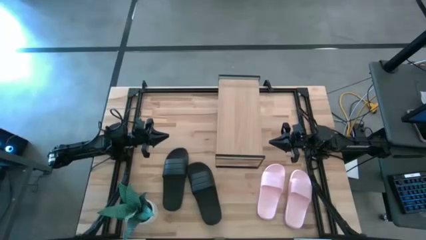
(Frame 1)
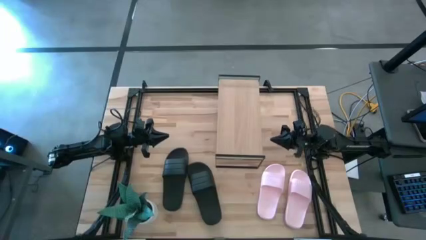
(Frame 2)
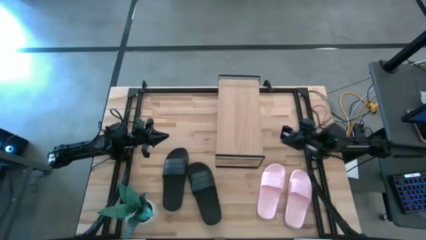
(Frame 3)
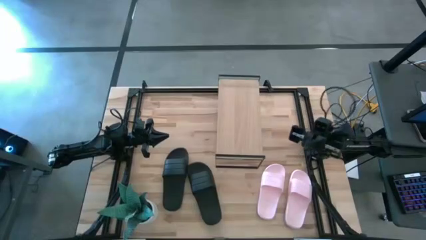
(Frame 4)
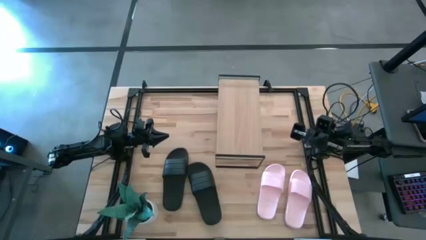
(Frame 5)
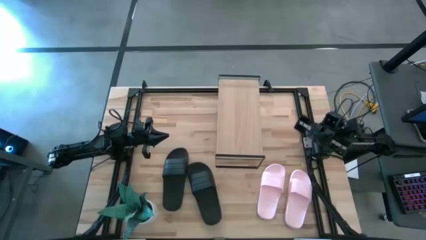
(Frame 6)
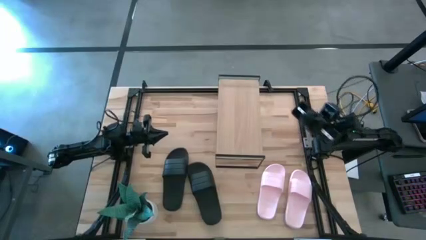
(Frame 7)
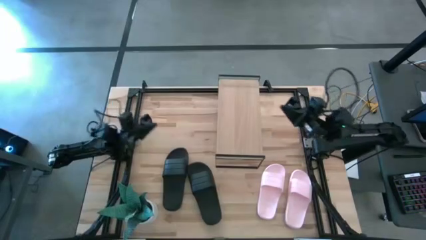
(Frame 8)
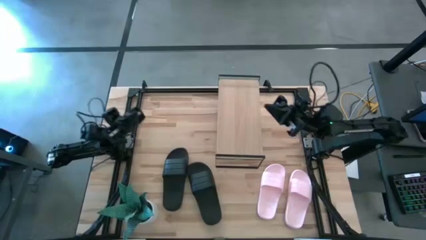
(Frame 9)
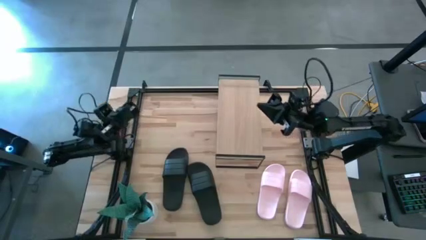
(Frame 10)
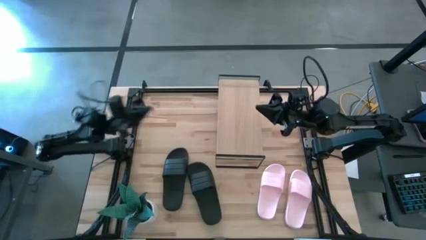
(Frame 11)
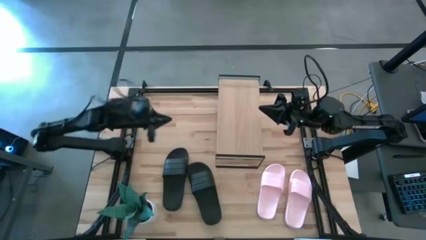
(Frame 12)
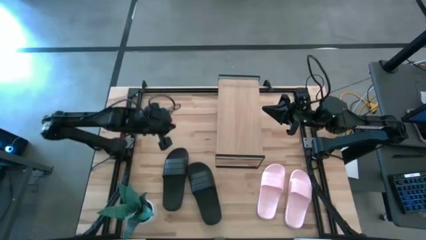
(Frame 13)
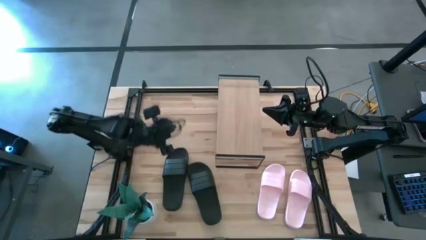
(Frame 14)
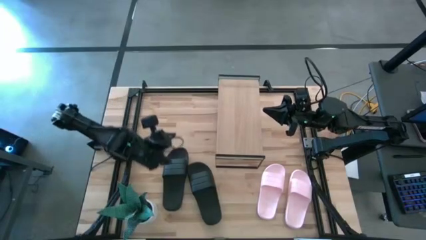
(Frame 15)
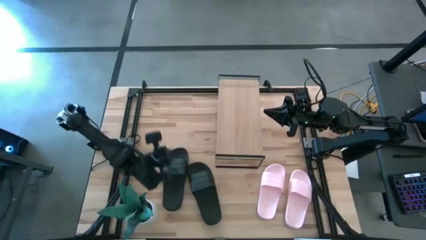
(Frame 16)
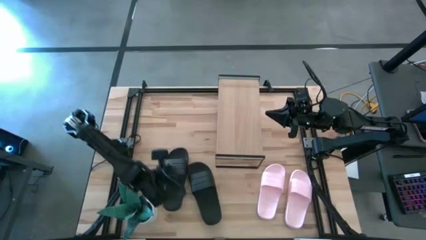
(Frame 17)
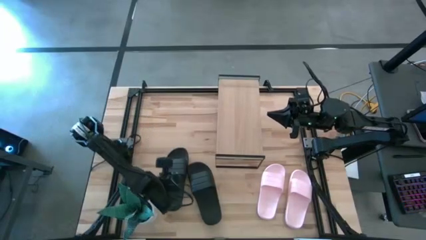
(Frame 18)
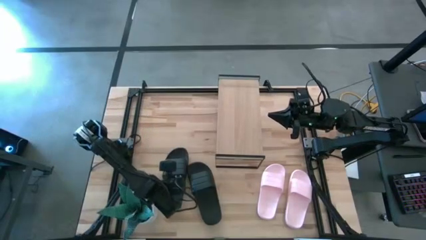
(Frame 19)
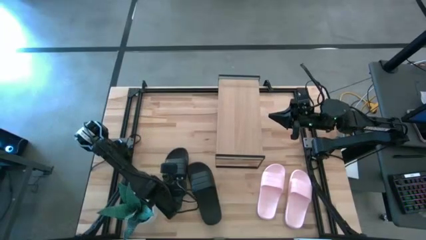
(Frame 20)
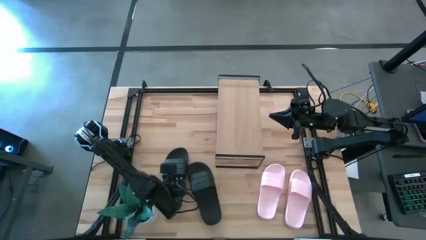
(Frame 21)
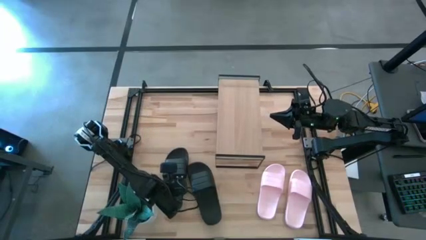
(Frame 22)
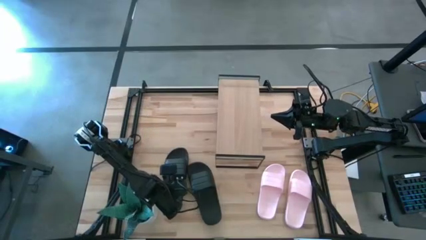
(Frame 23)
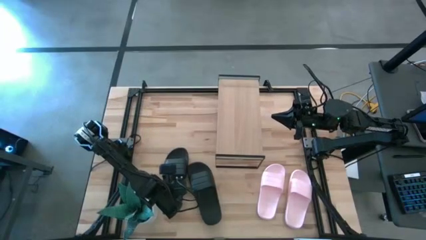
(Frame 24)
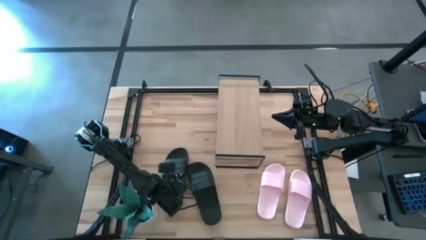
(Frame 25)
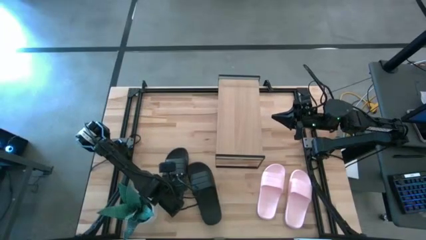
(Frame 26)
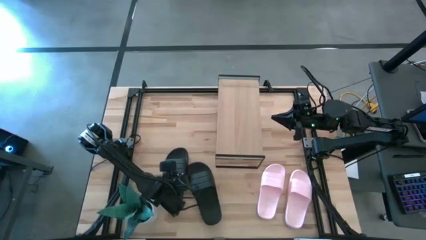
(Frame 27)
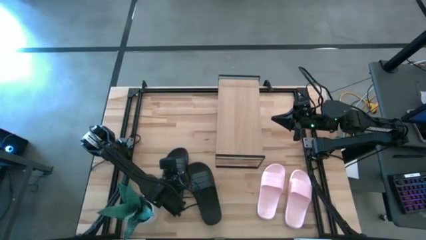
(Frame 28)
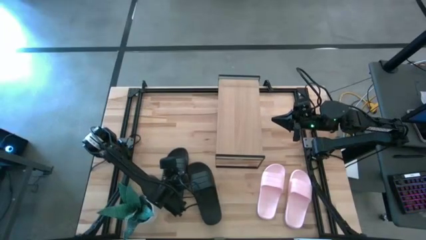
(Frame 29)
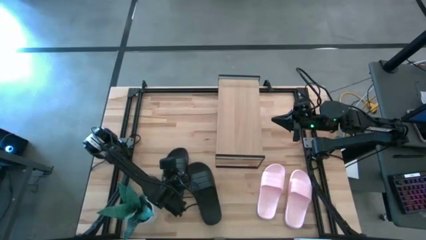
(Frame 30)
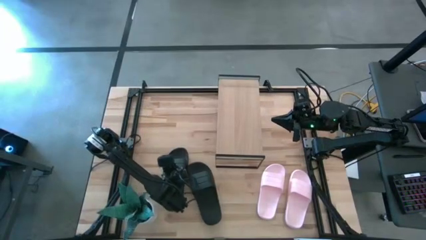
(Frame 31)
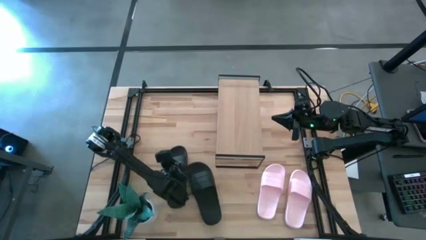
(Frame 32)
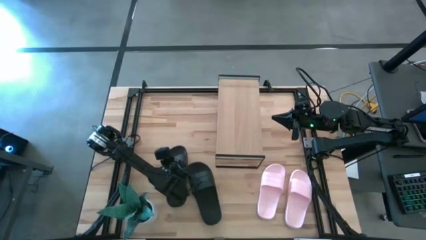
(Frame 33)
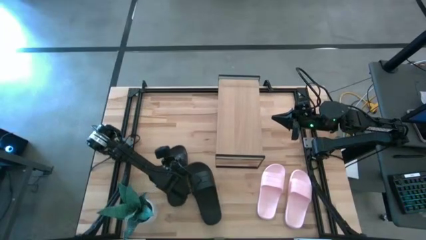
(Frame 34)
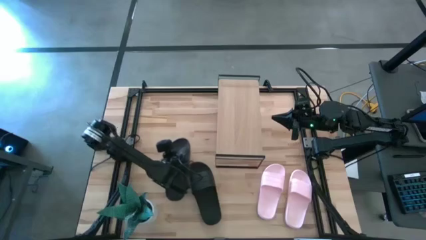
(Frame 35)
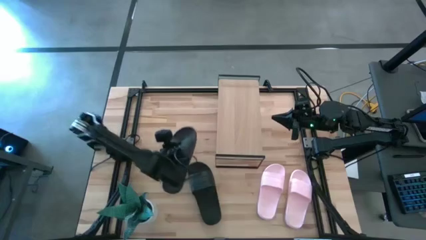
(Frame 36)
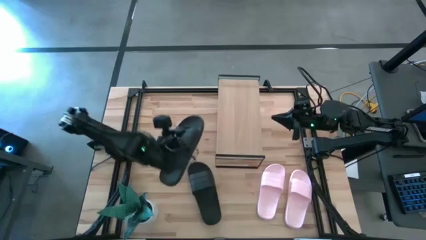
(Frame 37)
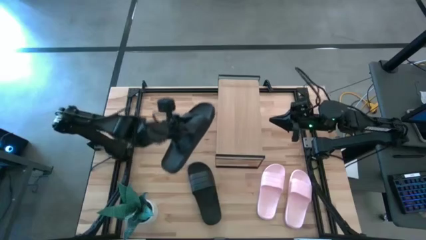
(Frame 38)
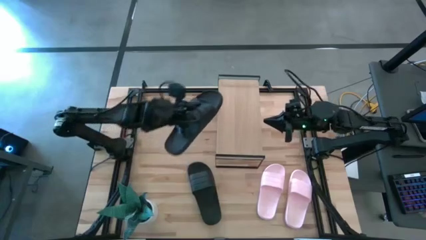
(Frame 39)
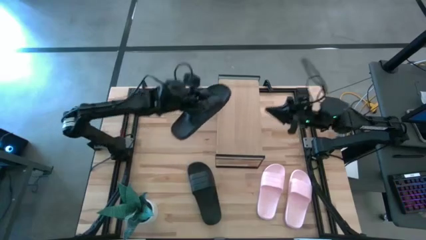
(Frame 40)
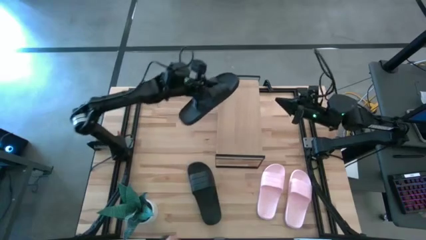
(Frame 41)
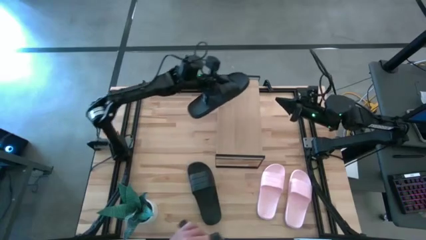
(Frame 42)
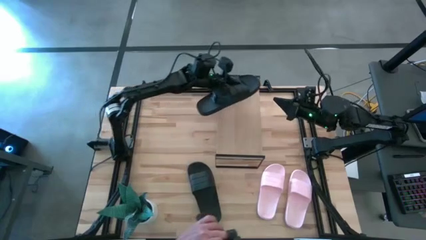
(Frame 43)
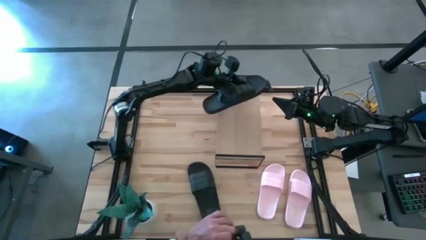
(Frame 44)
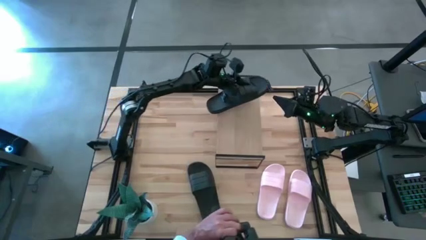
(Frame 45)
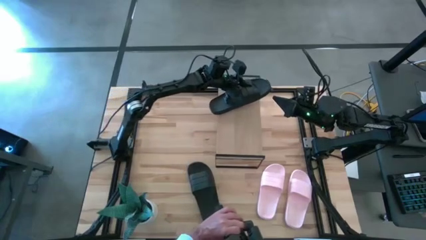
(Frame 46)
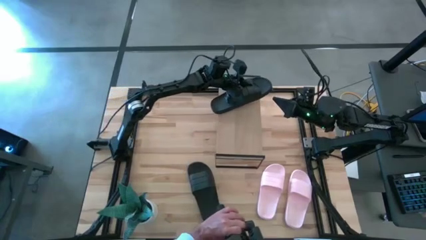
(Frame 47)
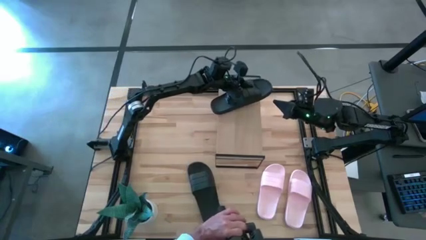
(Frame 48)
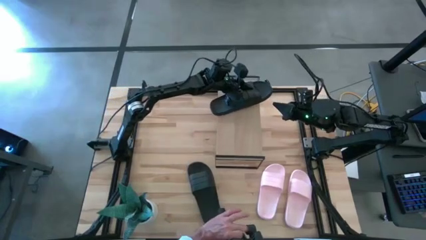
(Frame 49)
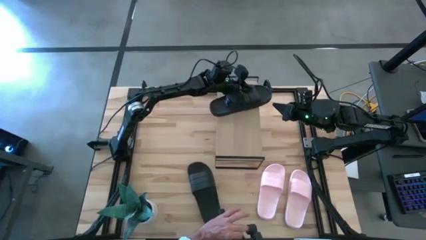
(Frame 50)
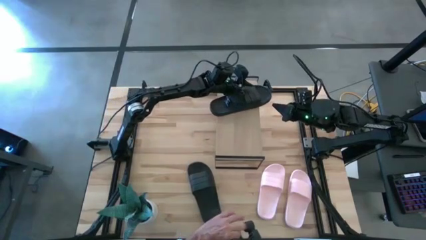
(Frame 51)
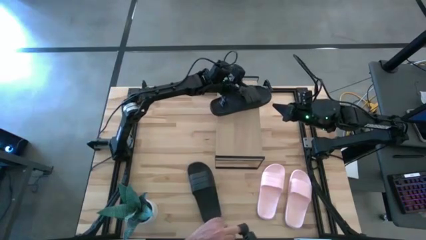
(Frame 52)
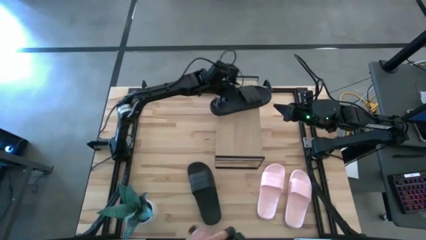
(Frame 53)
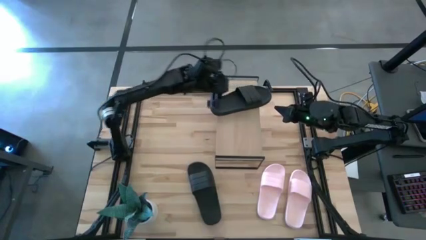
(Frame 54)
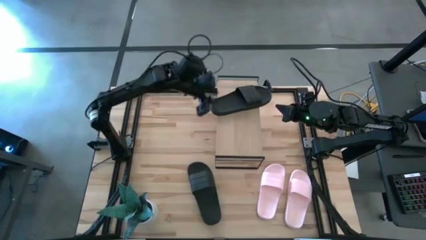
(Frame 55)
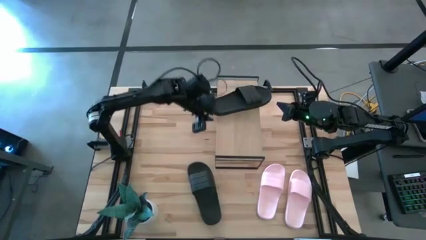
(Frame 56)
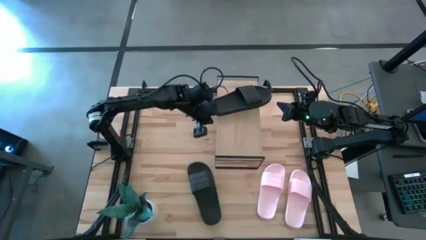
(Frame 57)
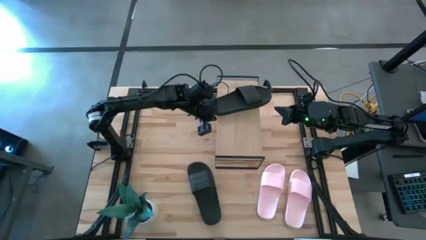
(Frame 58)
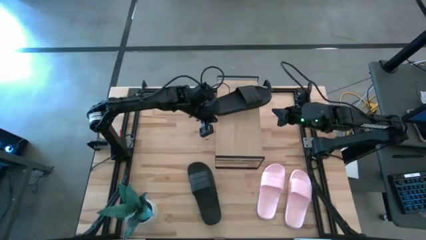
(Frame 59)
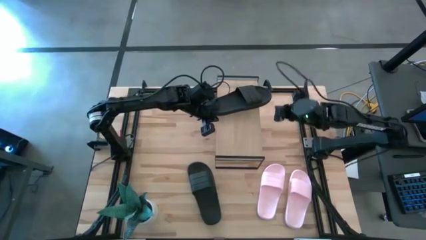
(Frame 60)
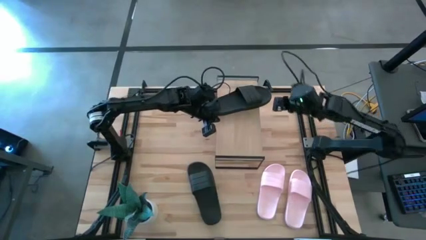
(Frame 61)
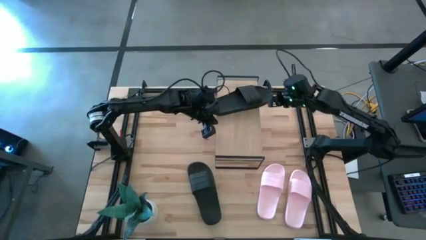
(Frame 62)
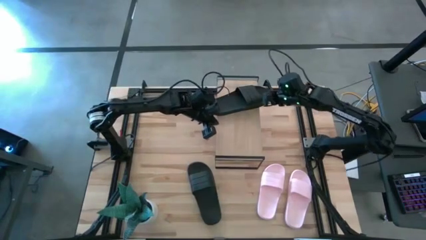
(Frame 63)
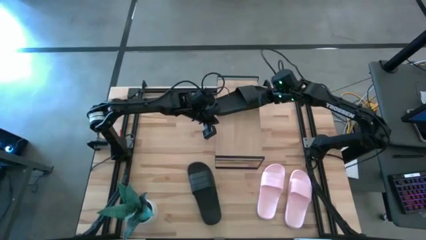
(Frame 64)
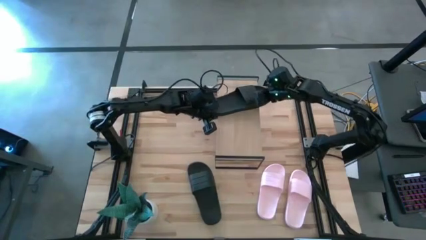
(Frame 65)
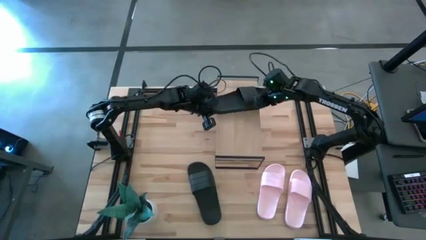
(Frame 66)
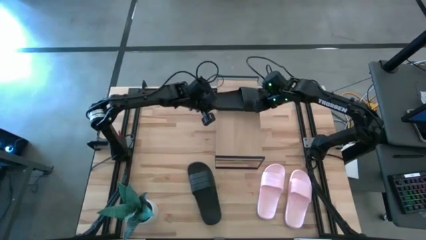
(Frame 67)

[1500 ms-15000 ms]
Task: Pick and place slides into the shelf
Put the left black slide on the shelf
